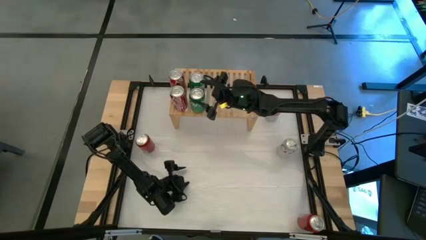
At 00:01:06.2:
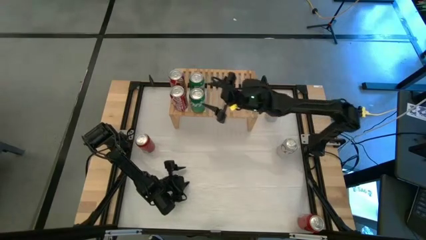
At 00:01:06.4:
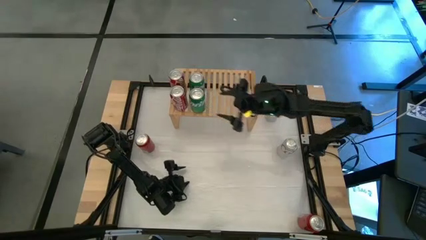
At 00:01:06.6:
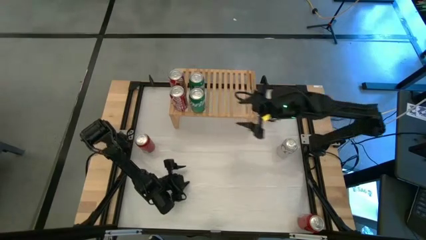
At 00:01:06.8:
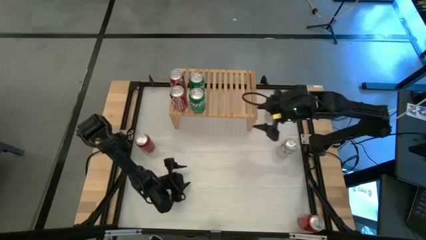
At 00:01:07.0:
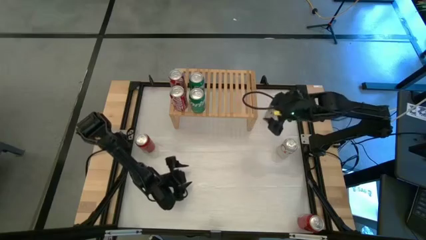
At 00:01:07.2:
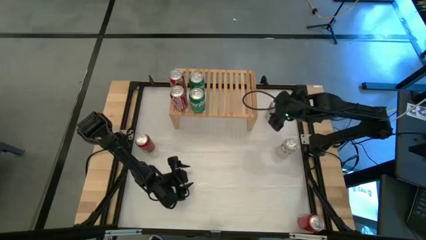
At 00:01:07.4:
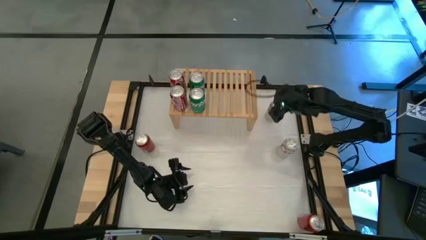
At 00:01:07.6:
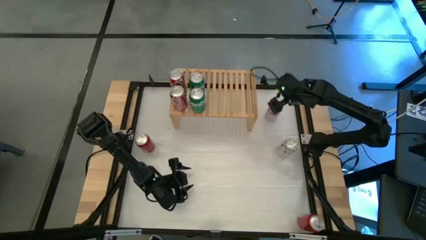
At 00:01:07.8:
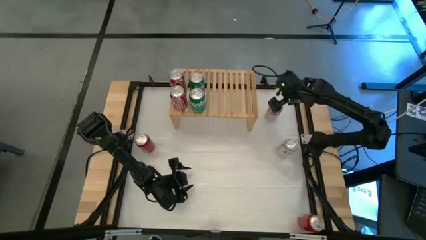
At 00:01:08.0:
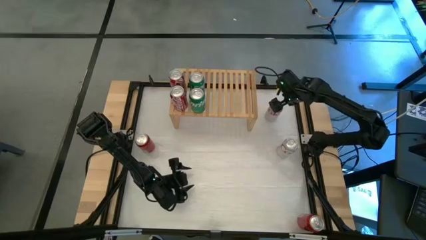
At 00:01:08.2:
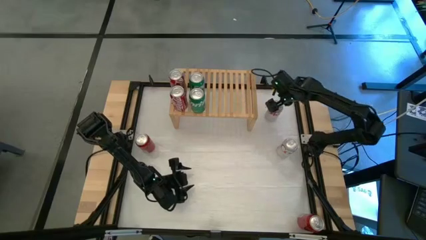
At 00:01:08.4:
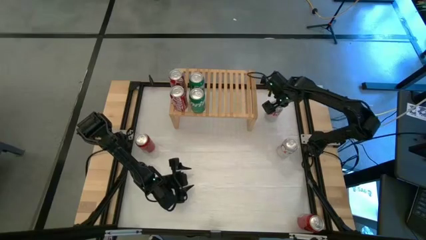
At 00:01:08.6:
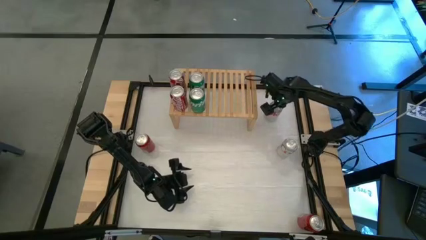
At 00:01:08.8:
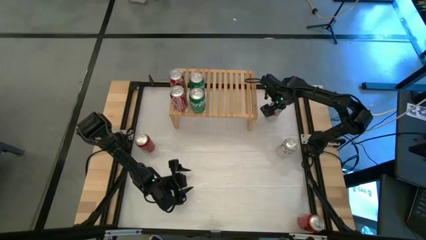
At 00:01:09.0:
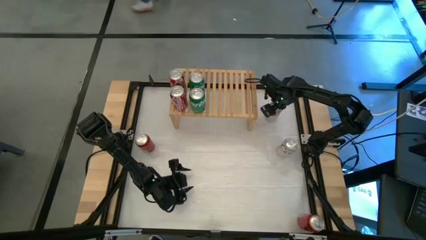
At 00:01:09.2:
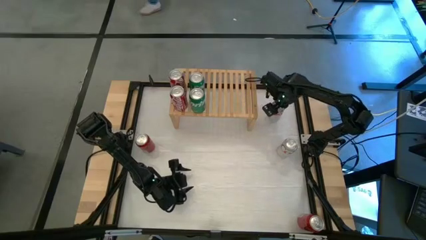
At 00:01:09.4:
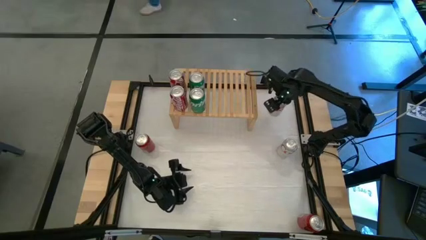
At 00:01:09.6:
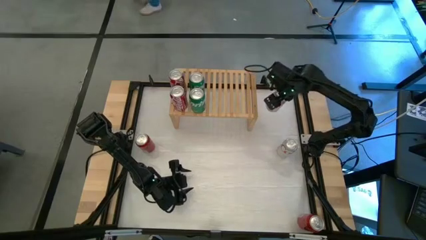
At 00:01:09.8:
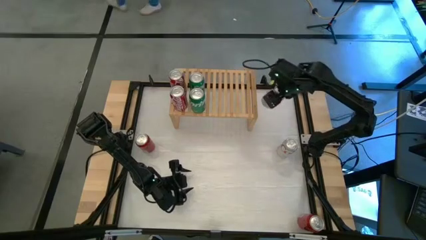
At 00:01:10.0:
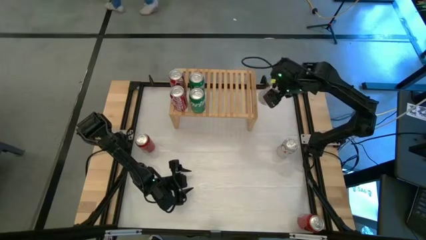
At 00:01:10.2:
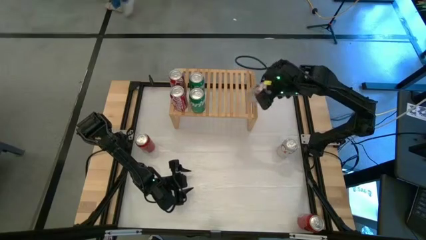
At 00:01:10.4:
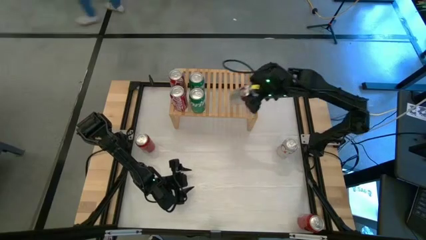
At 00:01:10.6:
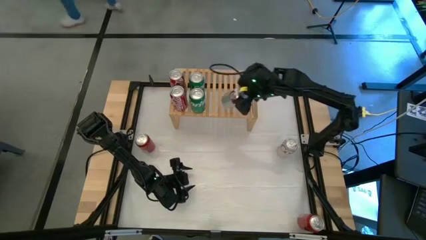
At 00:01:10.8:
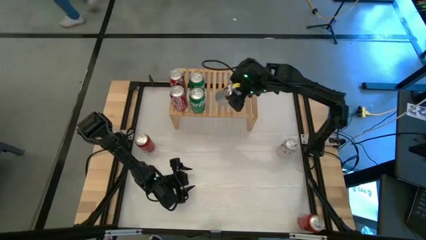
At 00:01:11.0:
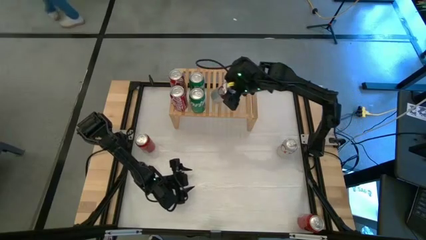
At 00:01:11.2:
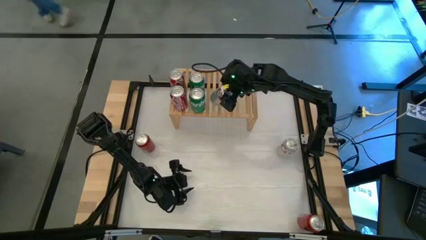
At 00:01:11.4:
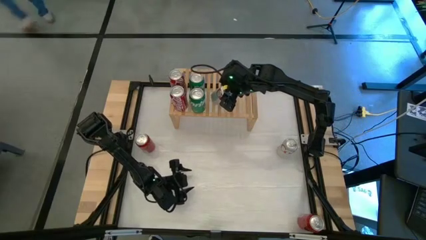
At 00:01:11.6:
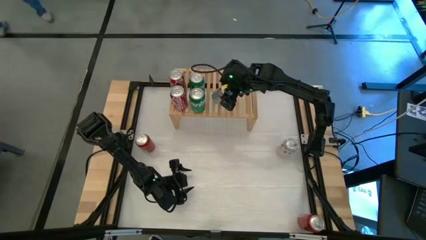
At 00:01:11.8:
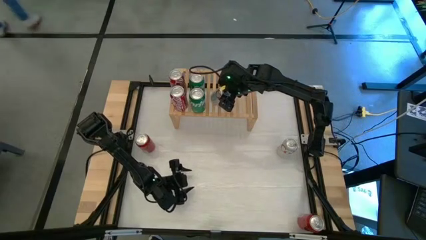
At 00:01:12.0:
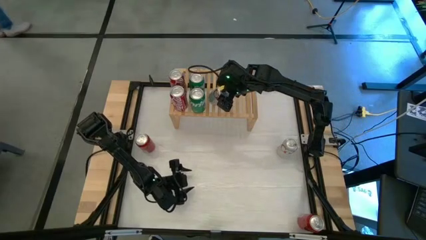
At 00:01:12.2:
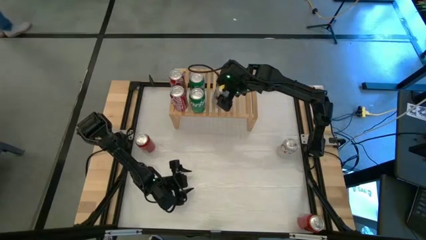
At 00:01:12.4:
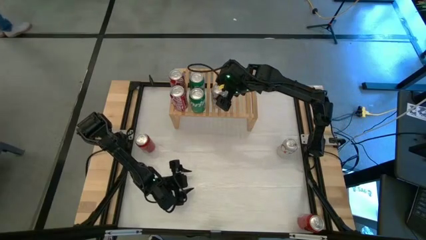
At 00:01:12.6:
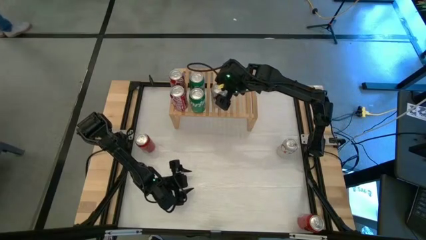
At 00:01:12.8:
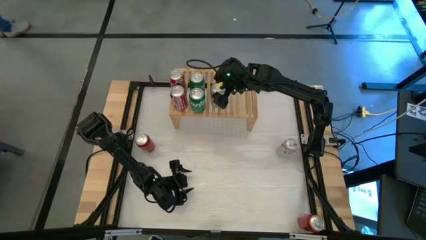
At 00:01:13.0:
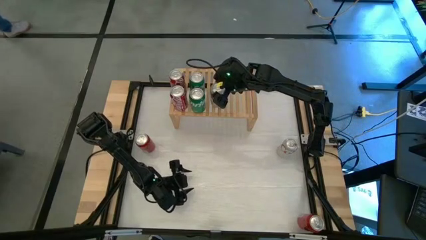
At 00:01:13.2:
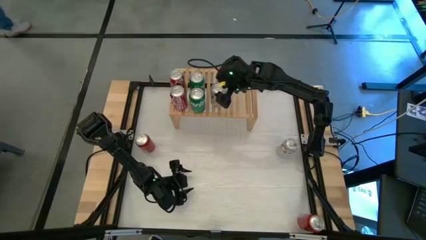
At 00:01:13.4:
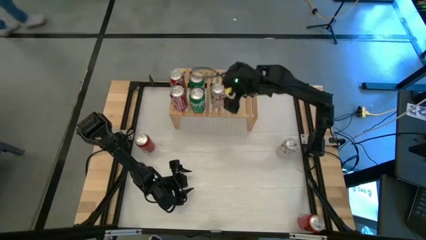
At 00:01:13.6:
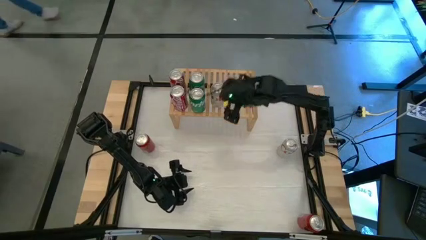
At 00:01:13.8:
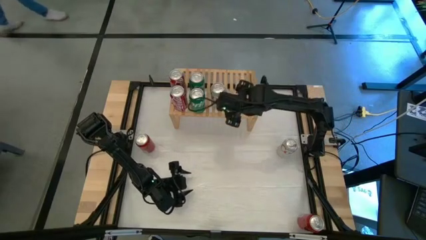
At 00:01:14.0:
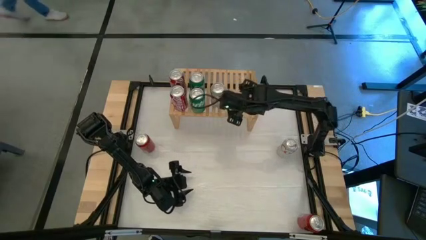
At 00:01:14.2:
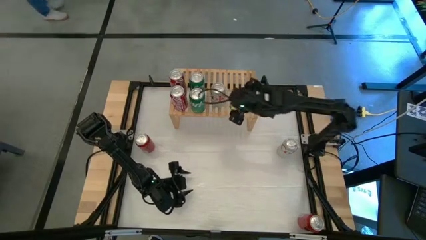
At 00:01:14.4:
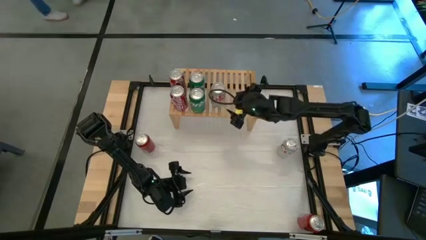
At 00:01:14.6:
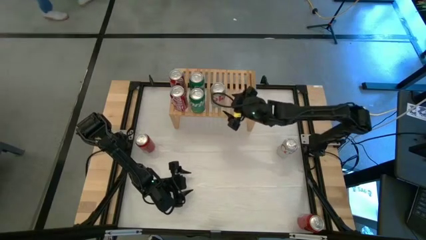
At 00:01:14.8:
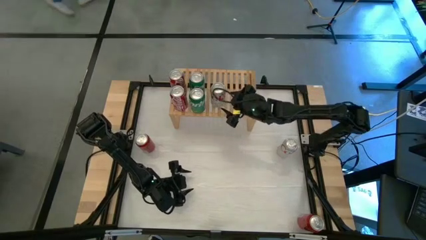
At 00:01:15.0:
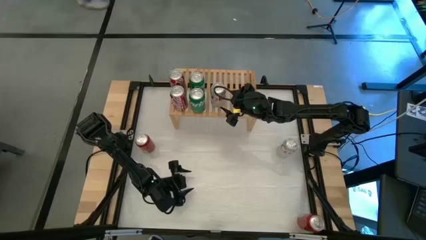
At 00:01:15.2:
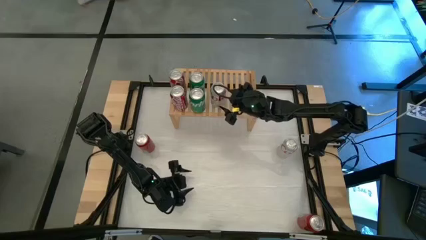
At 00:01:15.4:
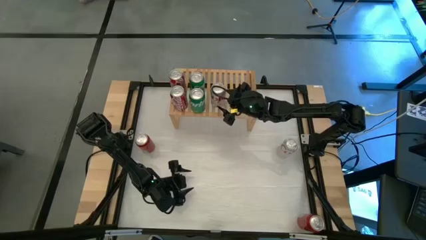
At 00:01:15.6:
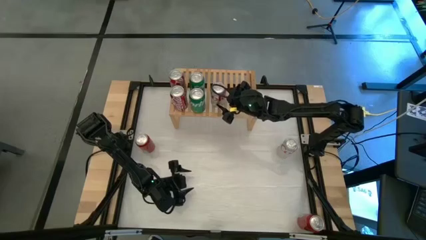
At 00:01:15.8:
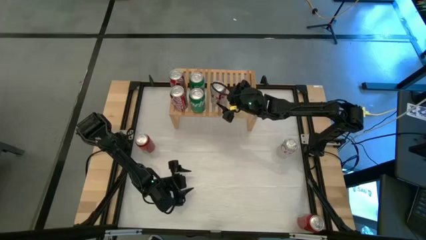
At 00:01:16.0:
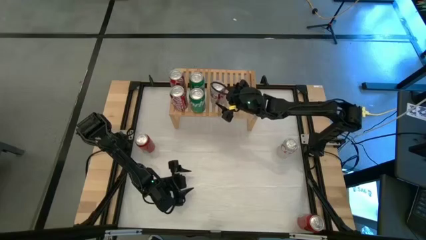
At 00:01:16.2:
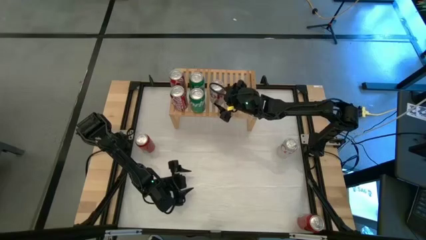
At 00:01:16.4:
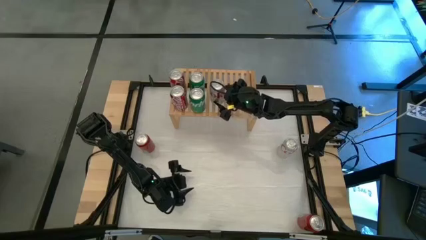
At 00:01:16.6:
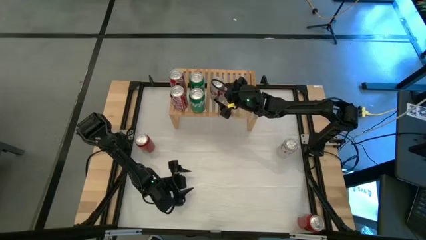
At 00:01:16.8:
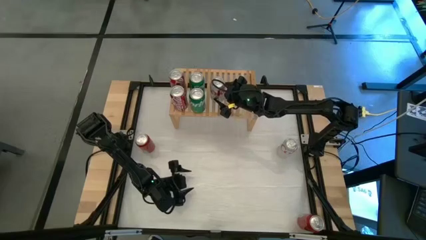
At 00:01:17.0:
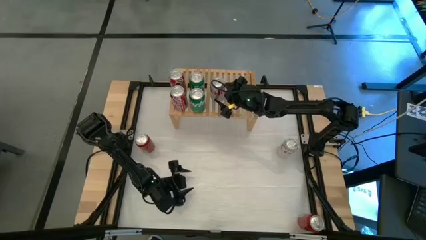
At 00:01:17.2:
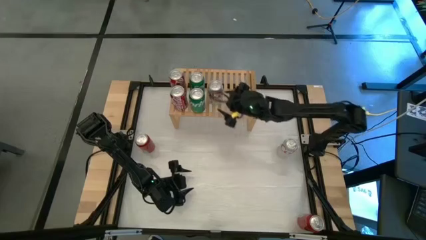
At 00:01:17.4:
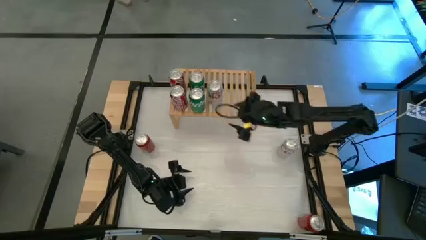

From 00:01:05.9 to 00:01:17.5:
Task: Place canned beverage on shelf
Put the top red silver soda can on the shelf

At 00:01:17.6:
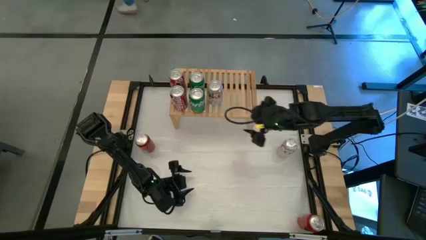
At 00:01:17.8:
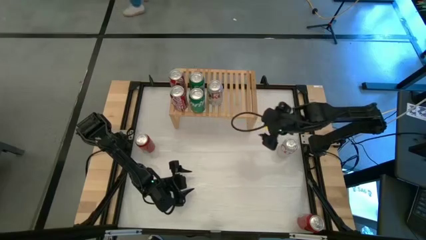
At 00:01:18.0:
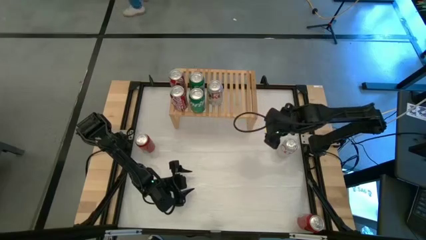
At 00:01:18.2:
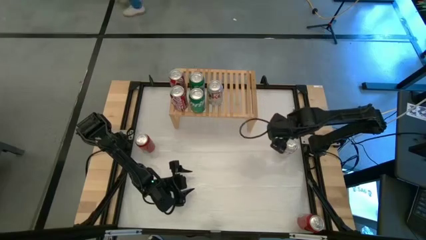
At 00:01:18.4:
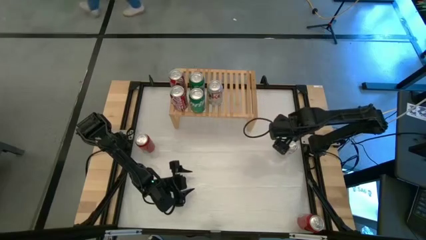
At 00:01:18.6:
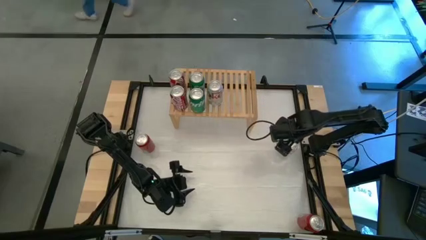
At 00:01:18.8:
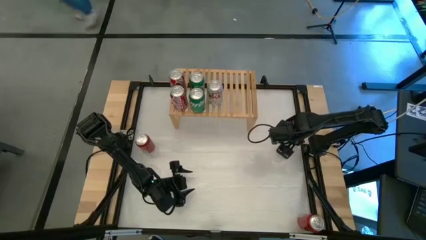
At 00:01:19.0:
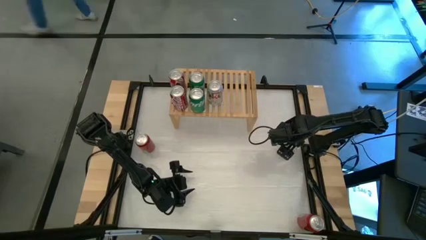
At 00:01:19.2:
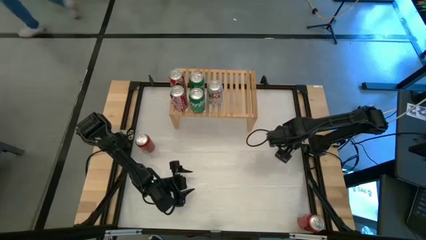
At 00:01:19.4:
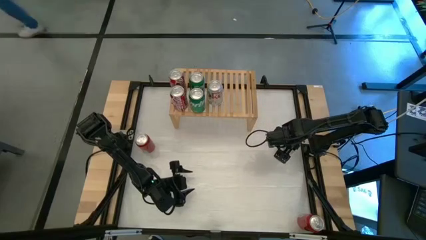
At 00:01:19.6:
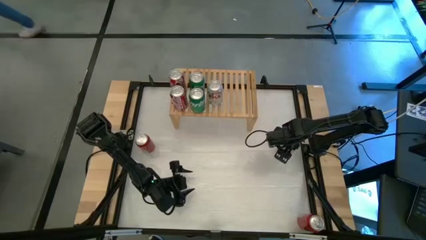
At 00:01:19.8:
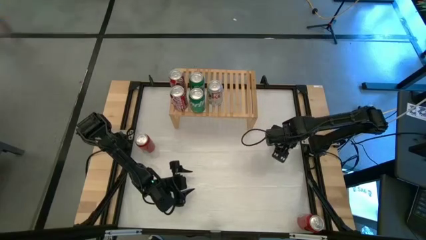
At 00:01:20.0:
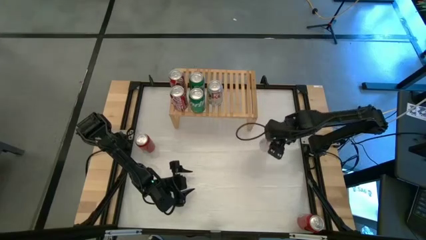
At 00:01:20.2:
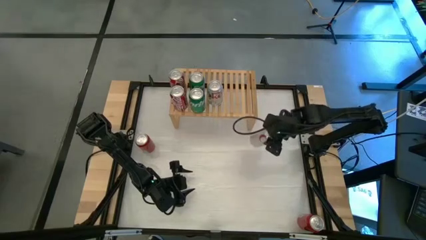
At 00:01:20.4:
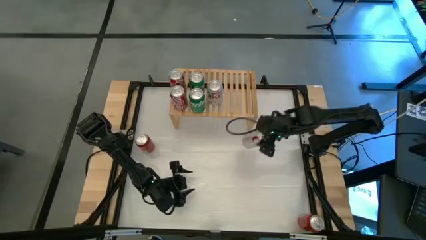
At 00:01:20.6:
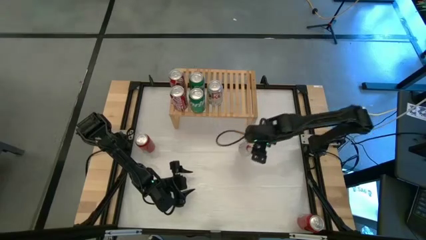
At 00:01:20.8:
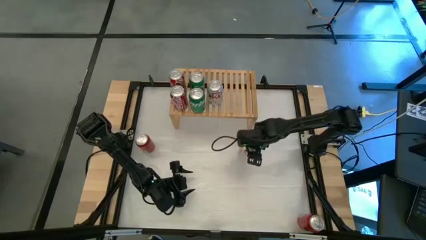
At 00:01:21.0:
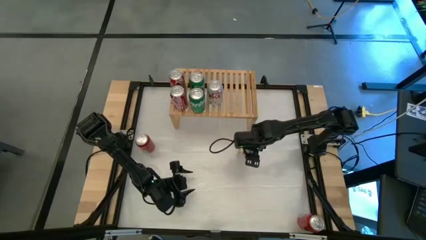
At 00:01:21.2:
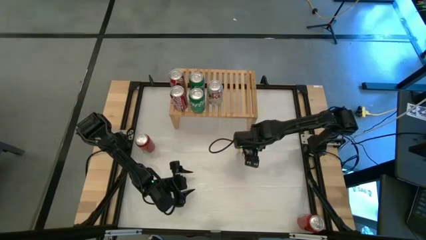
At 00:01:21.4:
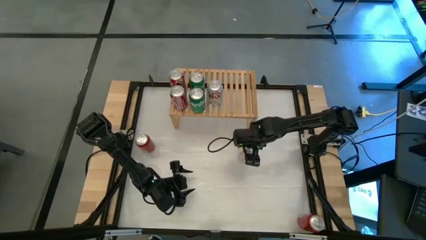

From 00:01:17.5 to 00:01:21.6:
Move the red silver soda can to the middle of the table
